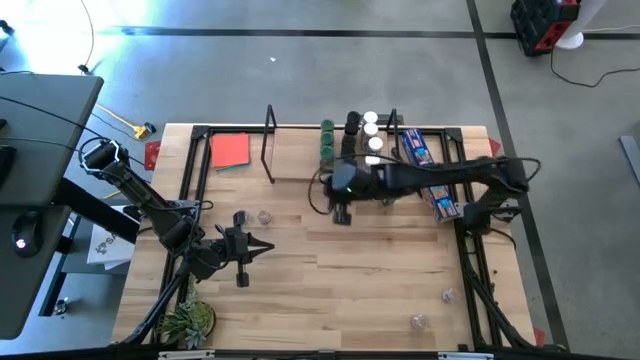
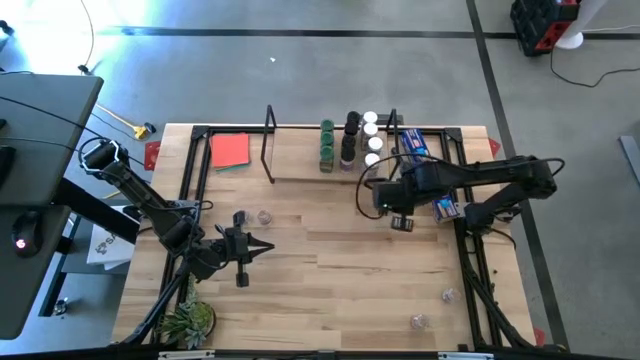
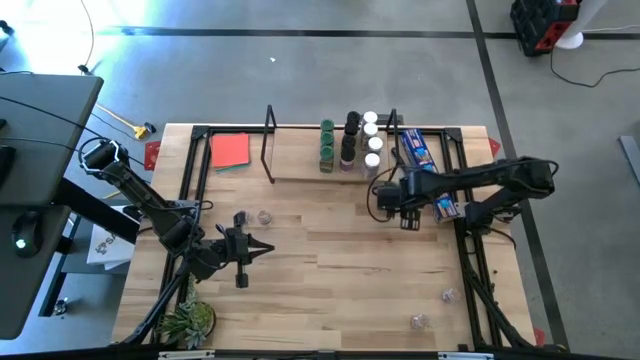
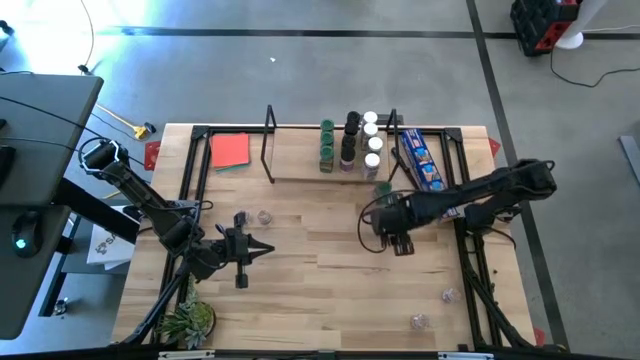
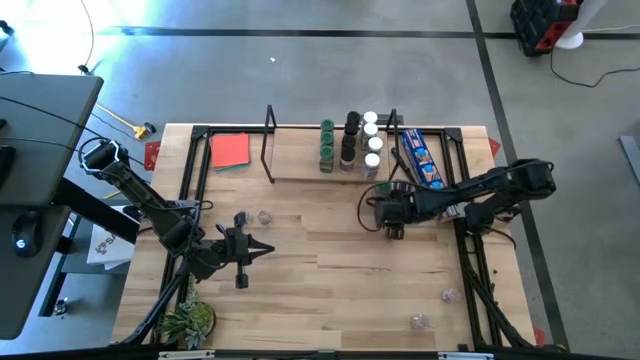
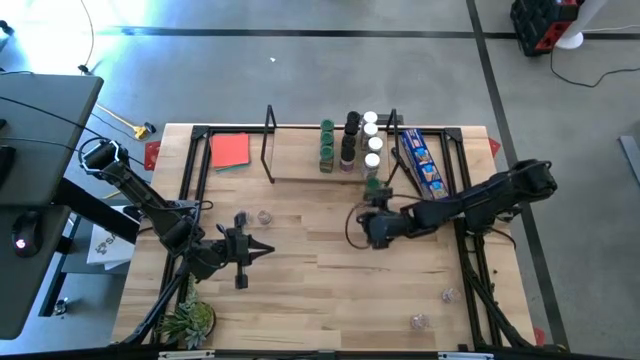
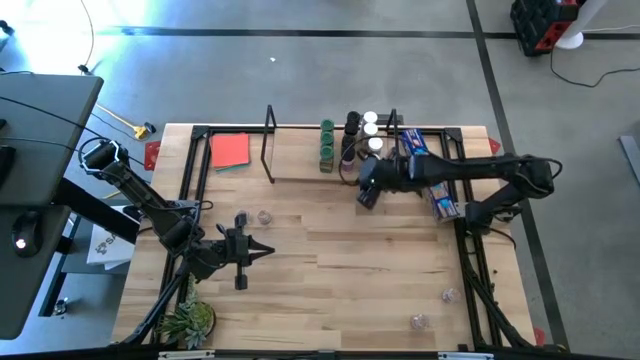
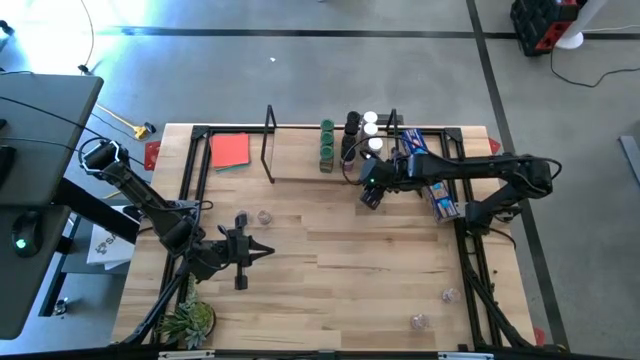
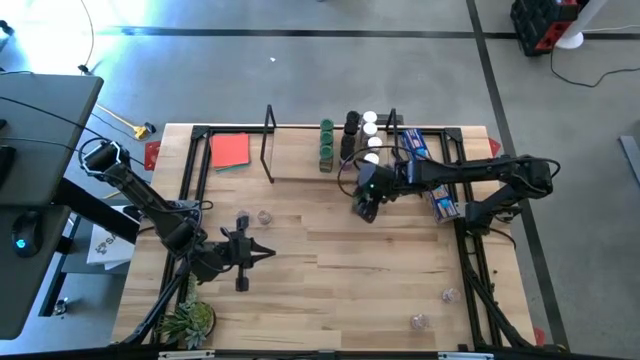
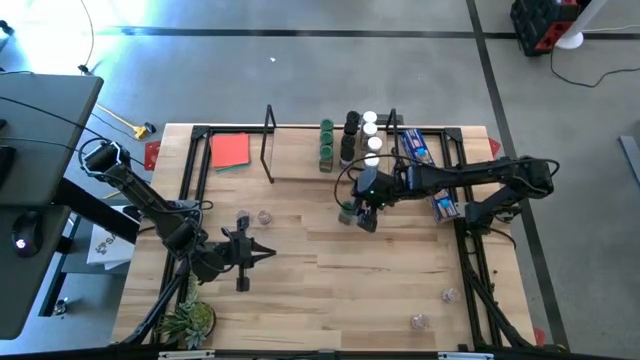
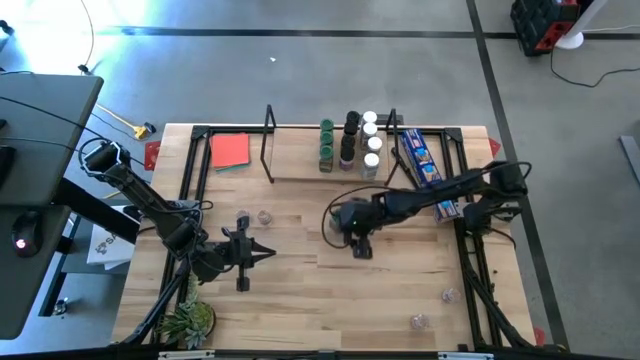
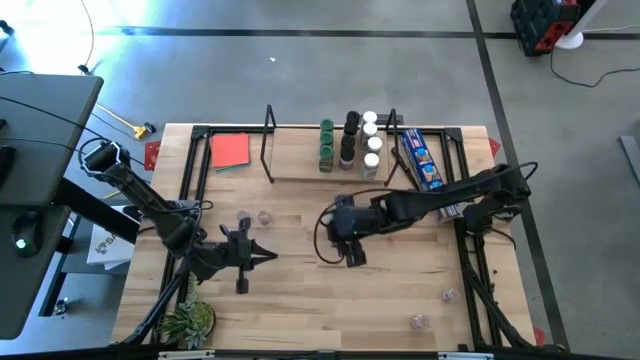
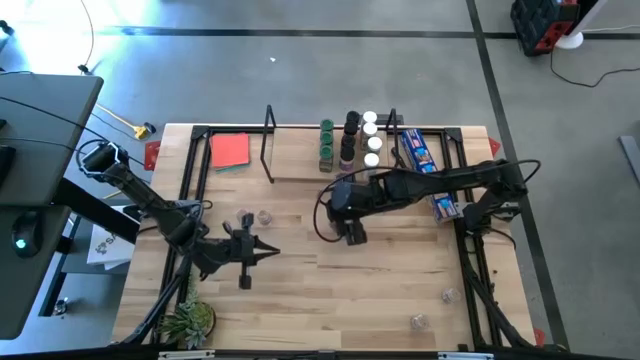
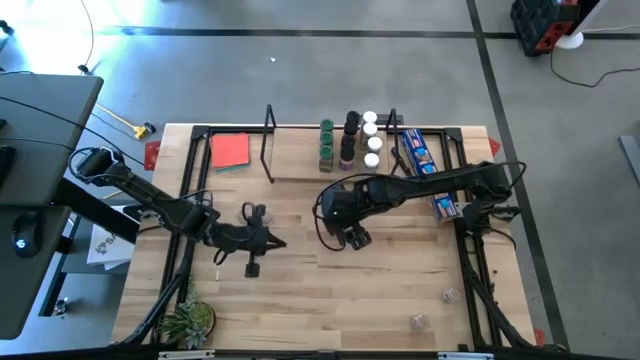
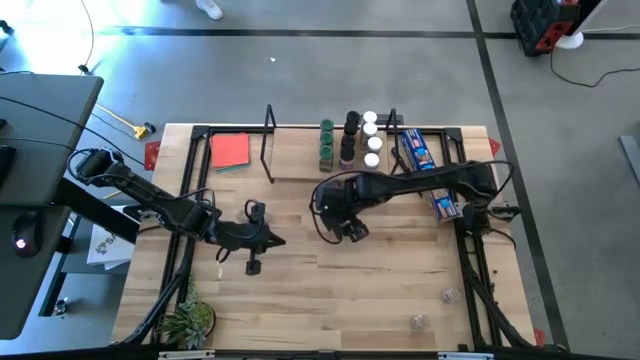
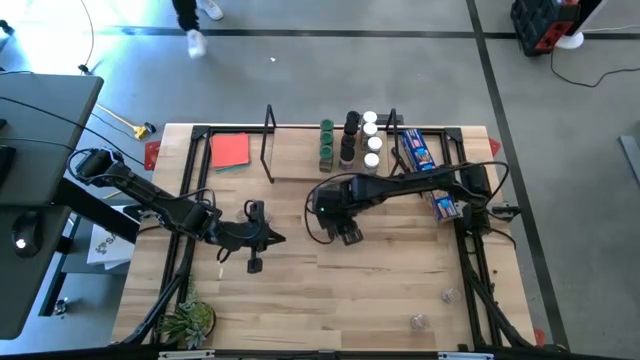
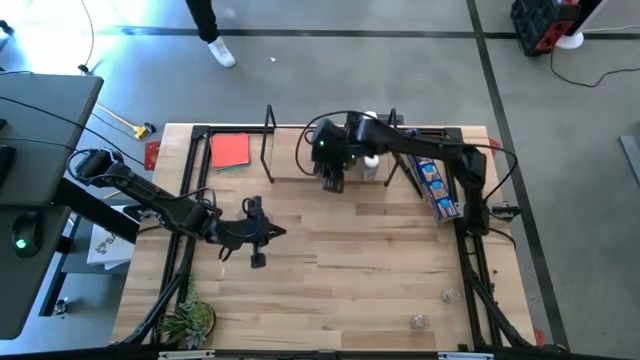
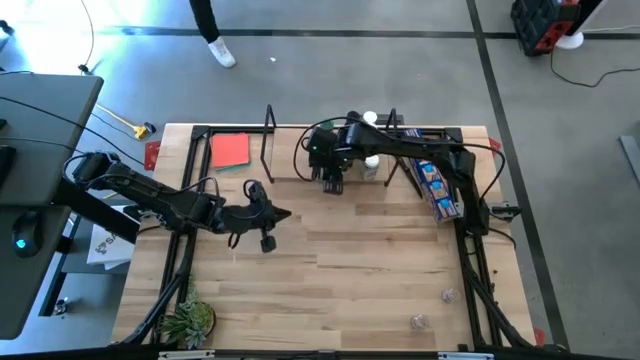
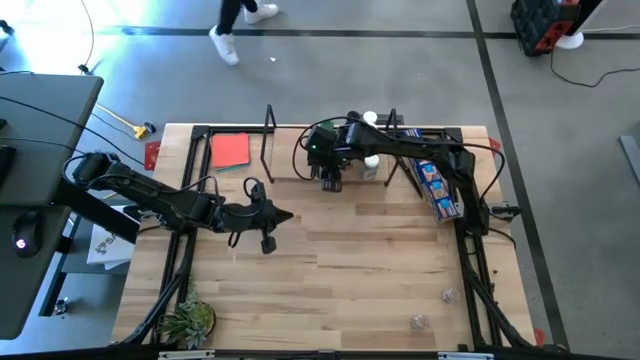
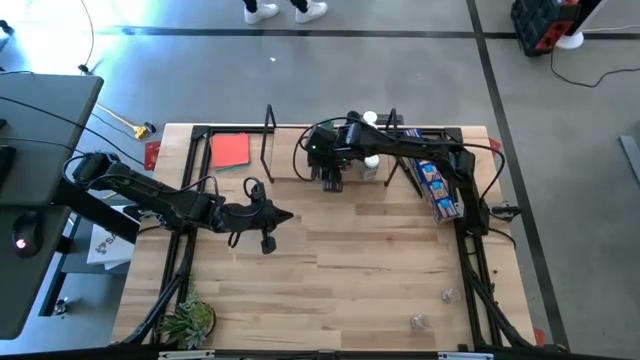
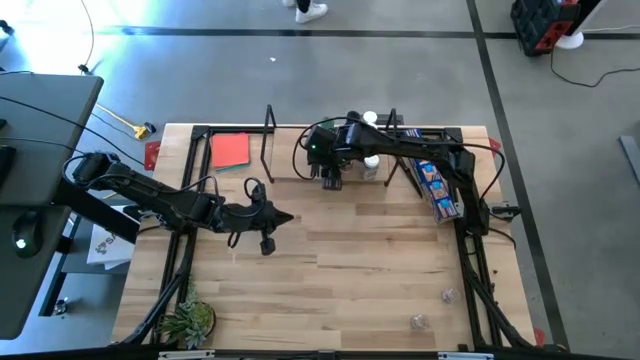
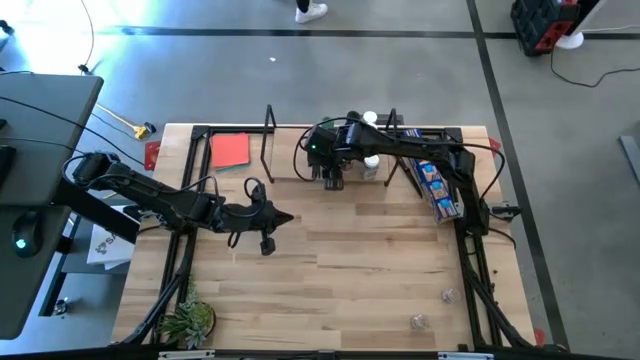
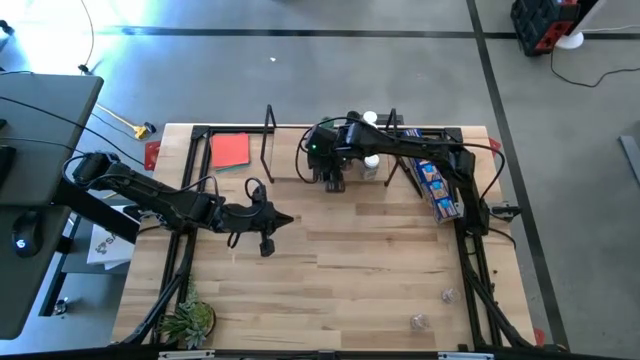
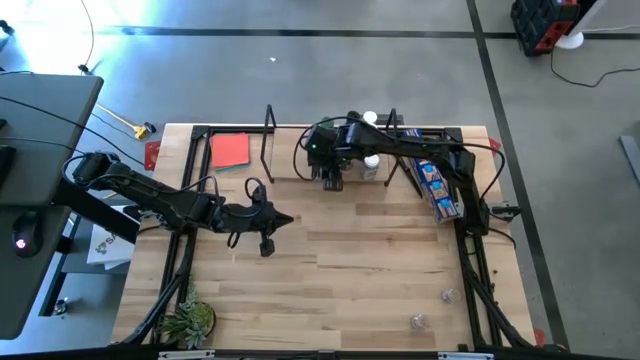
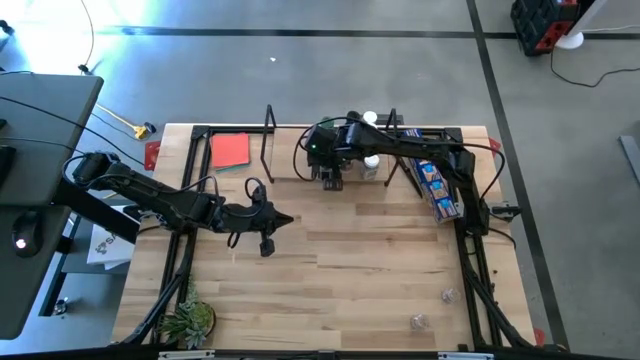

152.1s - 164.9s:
Task: Shelf spices
Put the green seasoning bottle on the shelf aligned with the other green seasoning bottle bottles

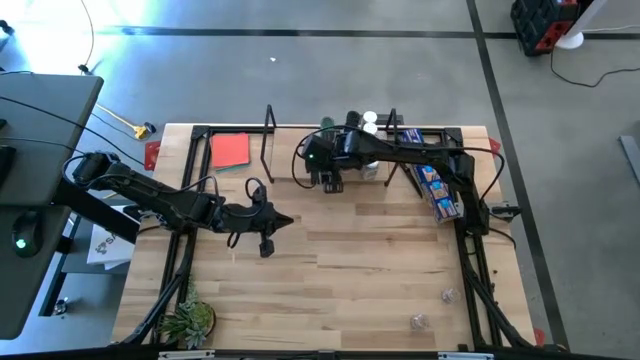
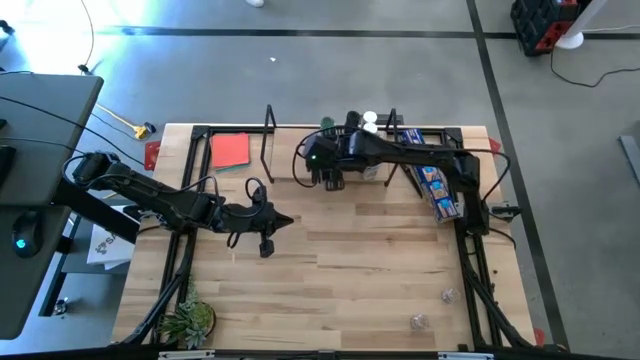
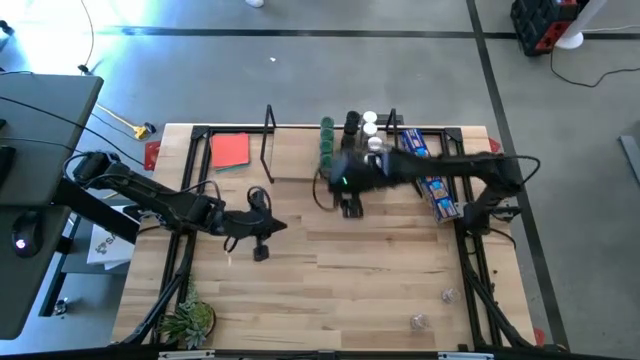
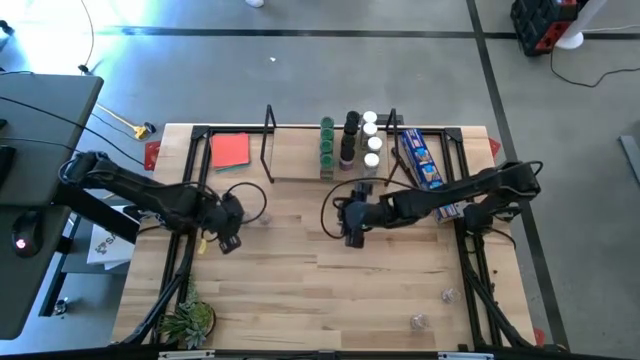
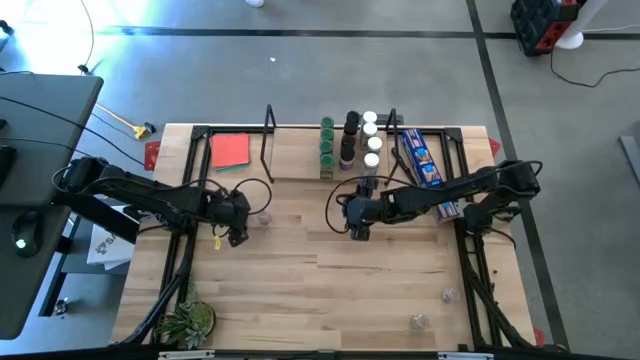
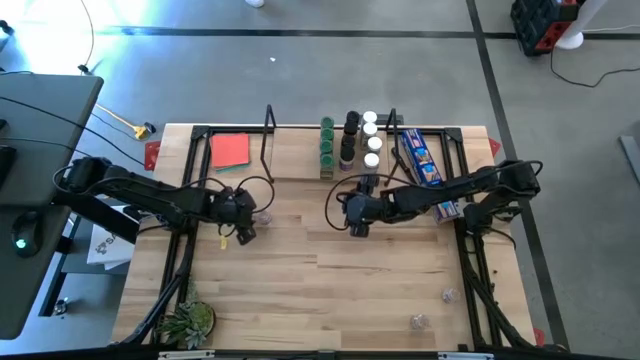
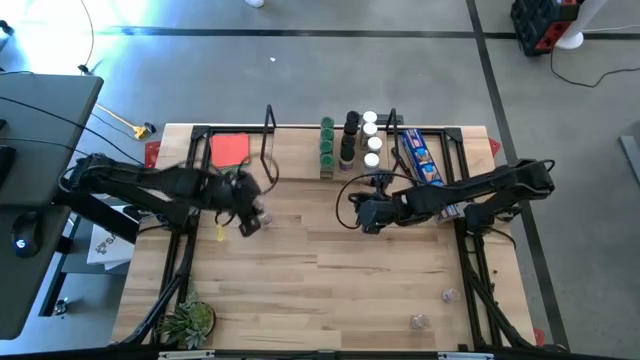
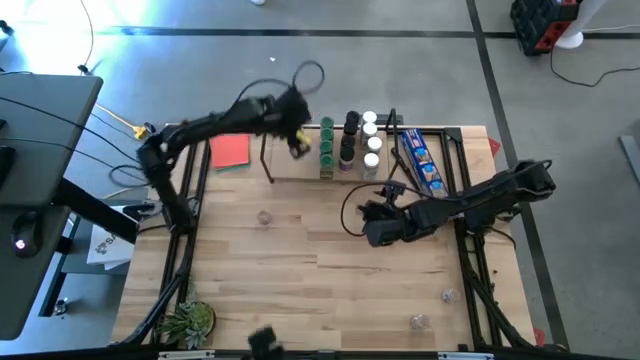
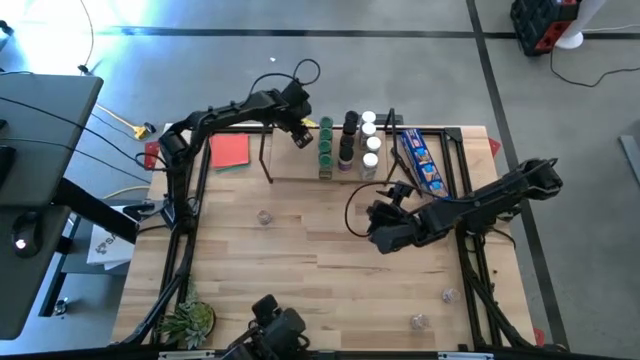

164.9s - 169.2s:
Put the top left brown seasoning bottle on the shelf aligned with the other brown seasoning bottle

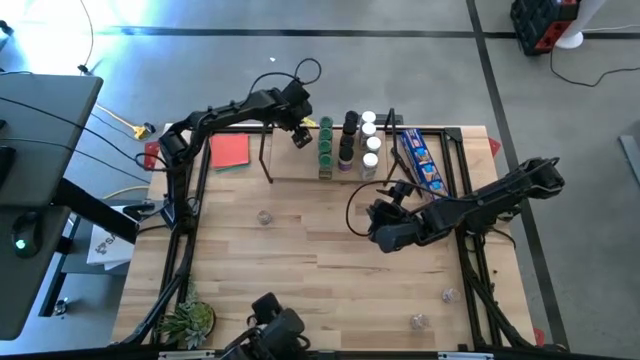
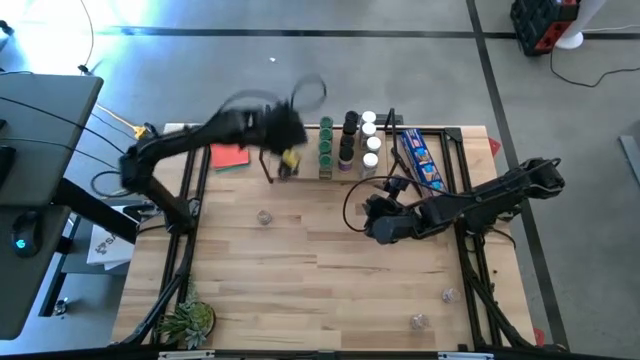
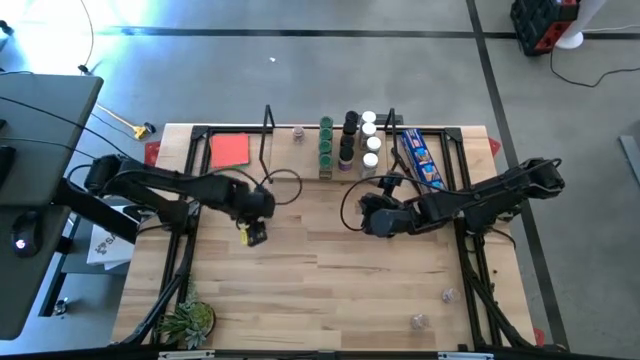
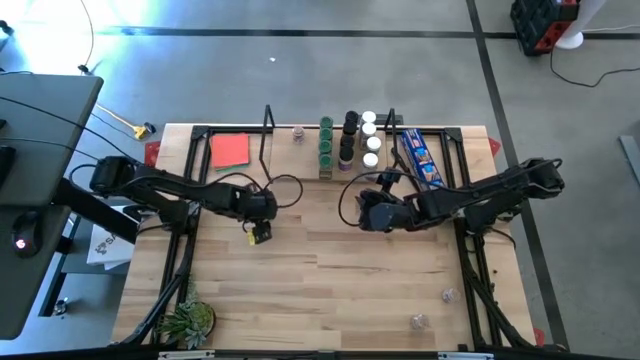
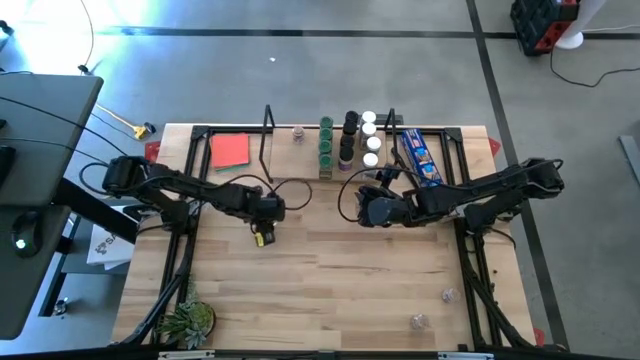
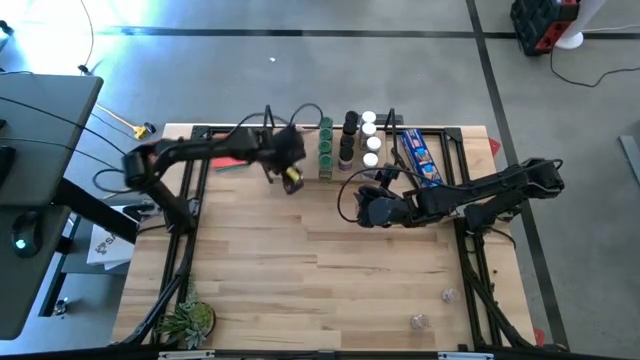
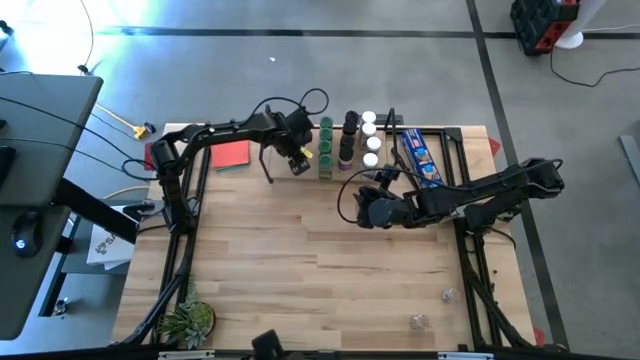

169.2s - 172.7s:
Put the top brown seasoning bottle on the shelf aligned with the other brown seasoning bottles
